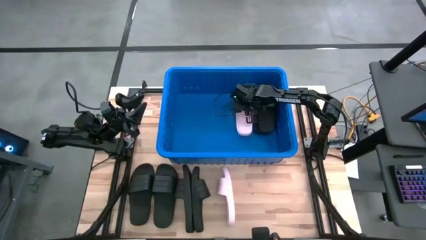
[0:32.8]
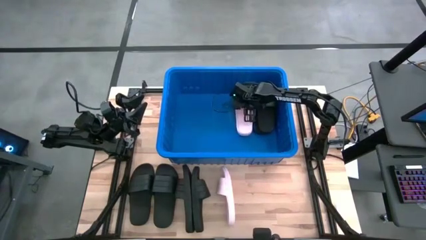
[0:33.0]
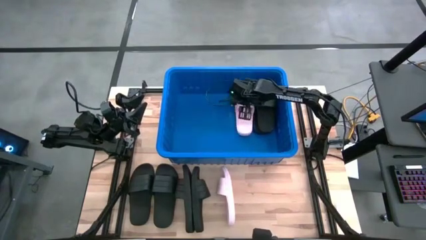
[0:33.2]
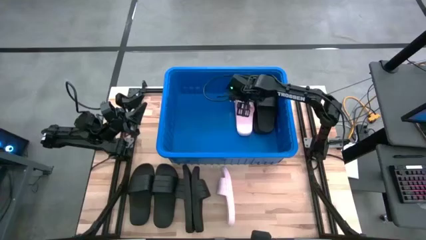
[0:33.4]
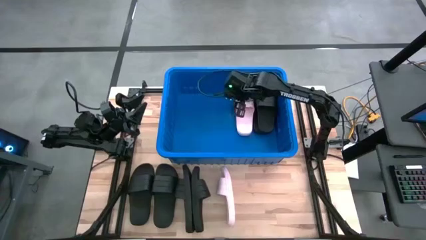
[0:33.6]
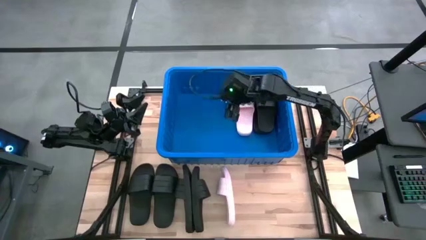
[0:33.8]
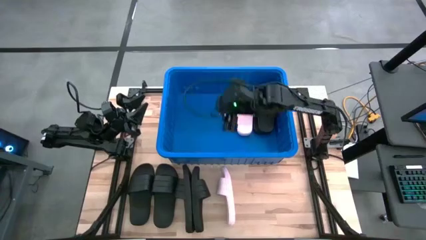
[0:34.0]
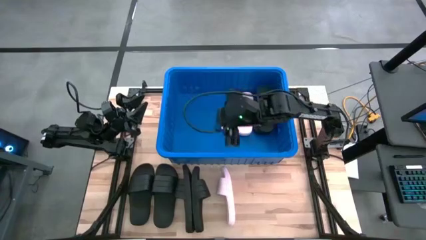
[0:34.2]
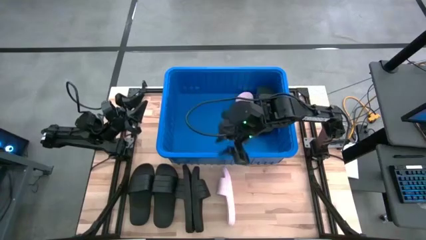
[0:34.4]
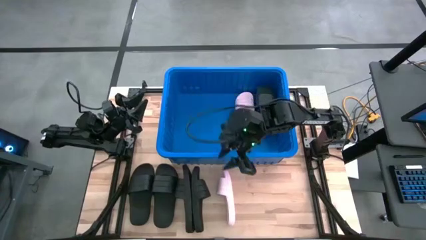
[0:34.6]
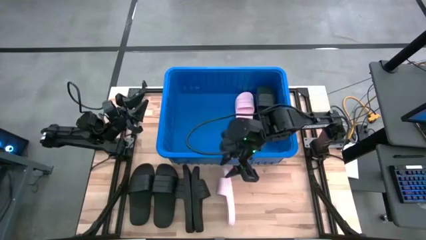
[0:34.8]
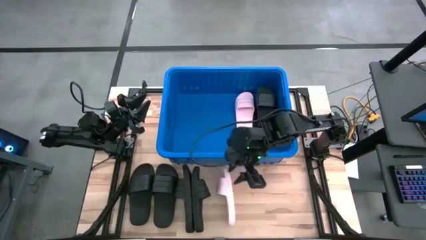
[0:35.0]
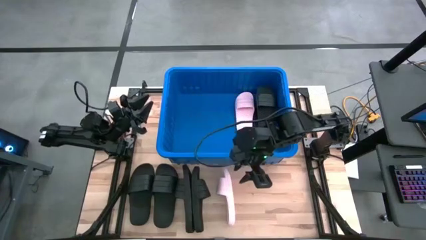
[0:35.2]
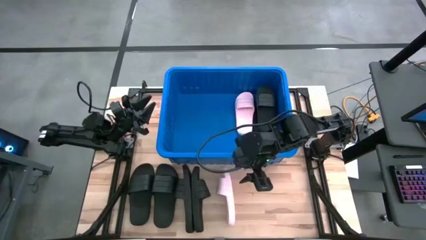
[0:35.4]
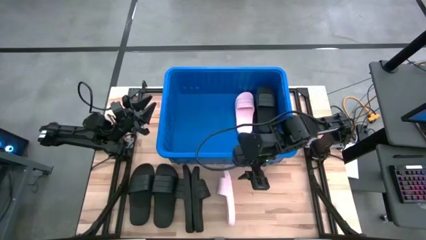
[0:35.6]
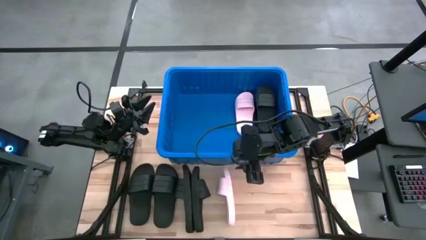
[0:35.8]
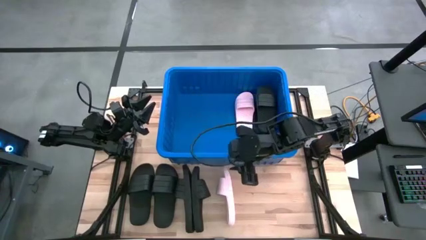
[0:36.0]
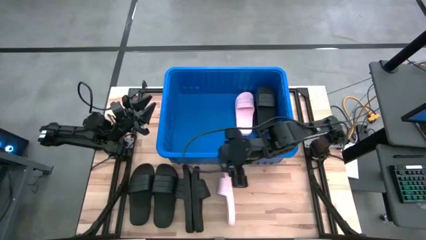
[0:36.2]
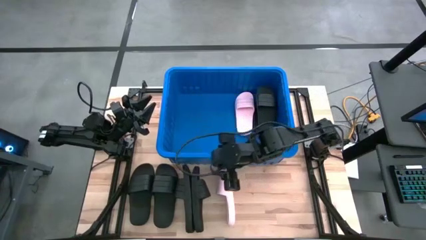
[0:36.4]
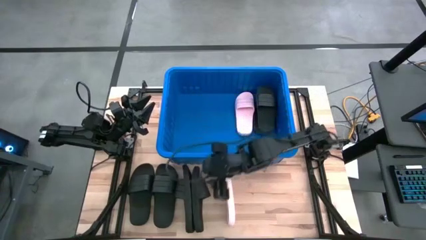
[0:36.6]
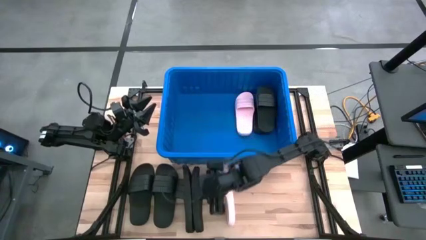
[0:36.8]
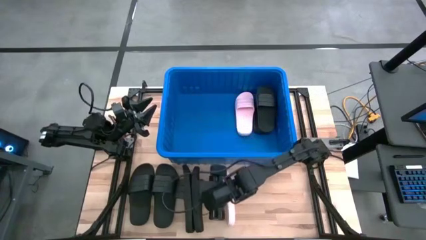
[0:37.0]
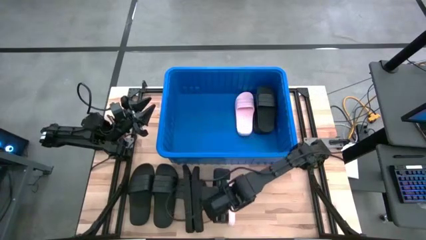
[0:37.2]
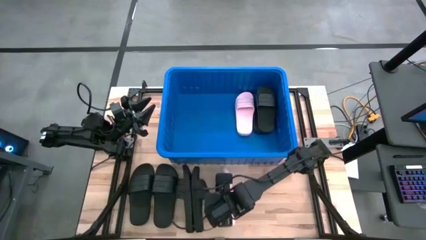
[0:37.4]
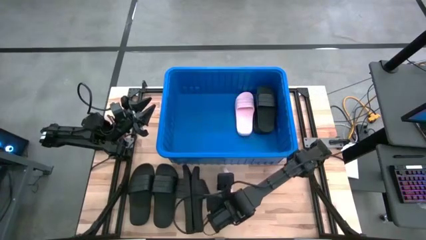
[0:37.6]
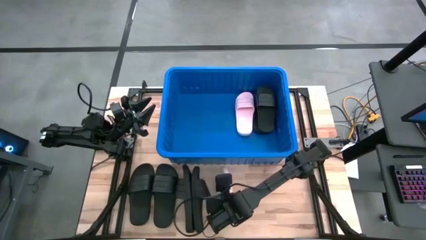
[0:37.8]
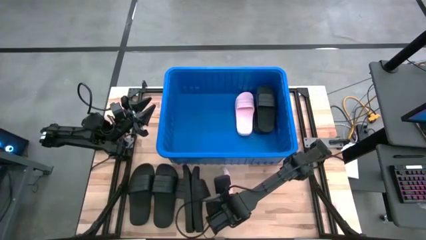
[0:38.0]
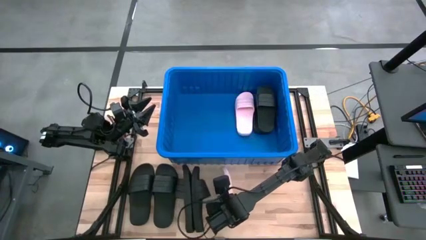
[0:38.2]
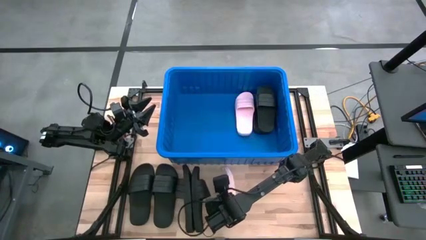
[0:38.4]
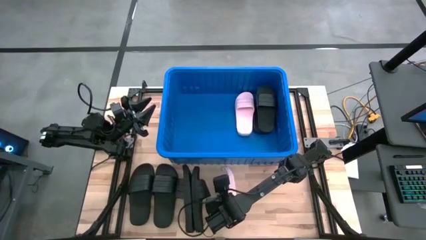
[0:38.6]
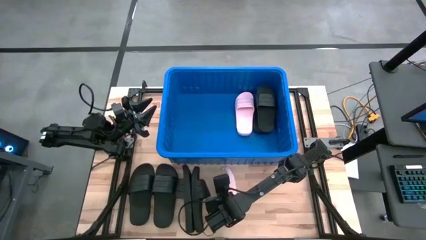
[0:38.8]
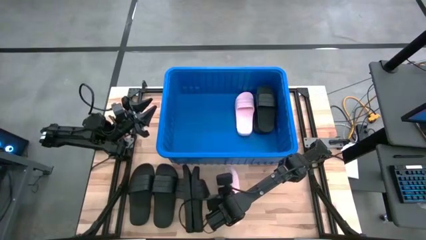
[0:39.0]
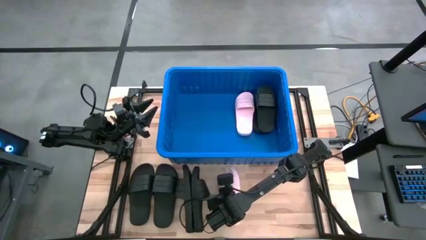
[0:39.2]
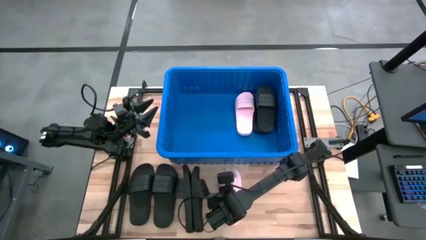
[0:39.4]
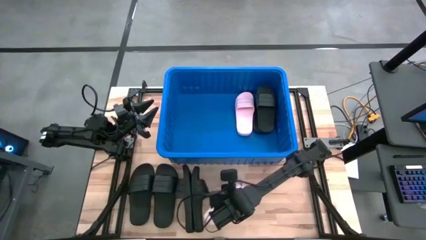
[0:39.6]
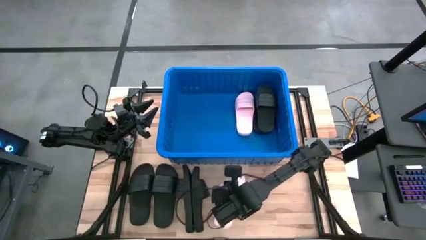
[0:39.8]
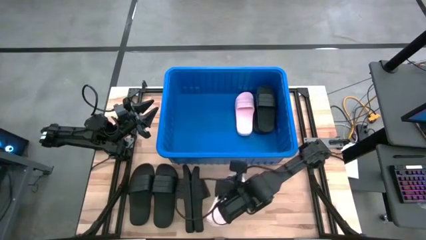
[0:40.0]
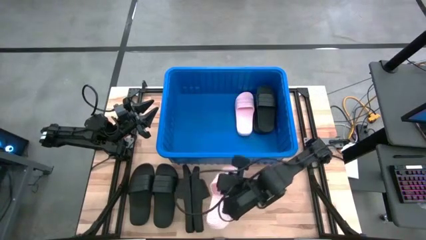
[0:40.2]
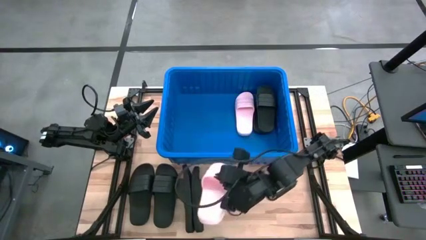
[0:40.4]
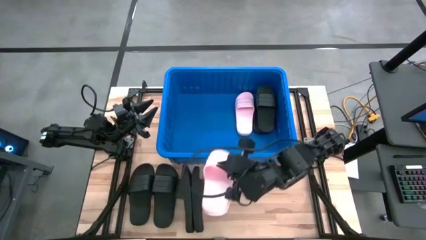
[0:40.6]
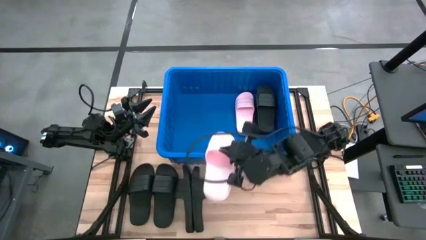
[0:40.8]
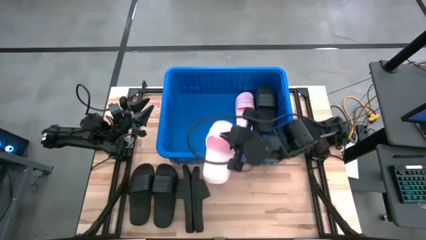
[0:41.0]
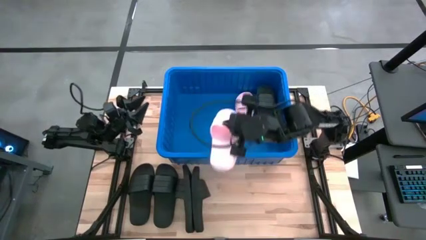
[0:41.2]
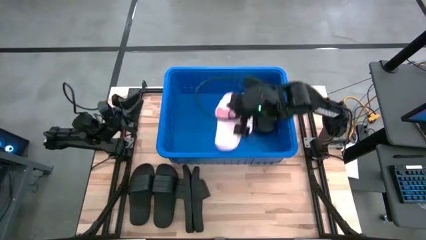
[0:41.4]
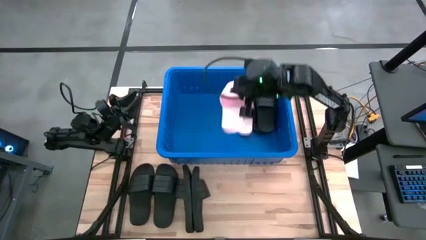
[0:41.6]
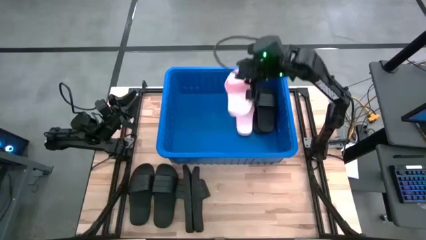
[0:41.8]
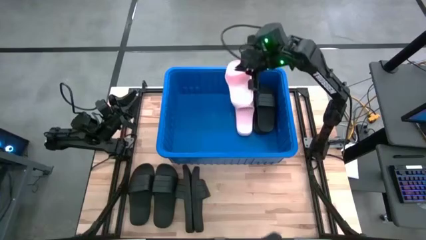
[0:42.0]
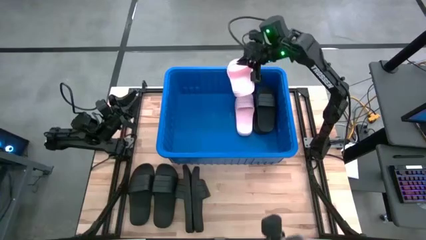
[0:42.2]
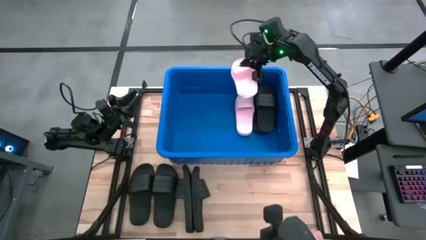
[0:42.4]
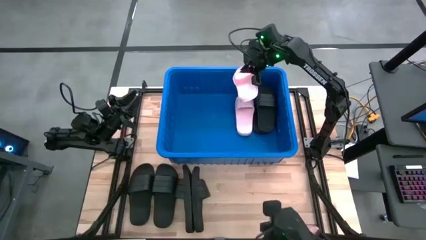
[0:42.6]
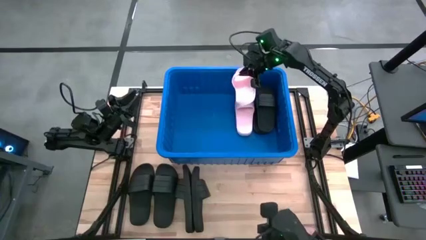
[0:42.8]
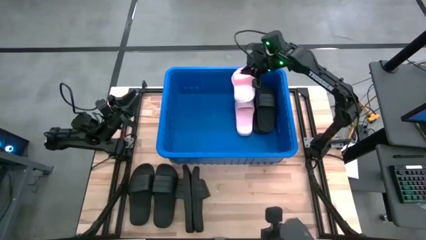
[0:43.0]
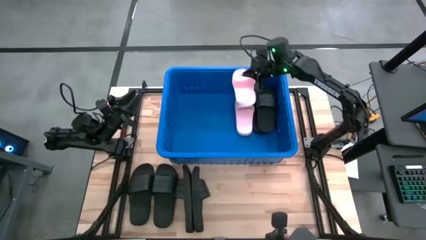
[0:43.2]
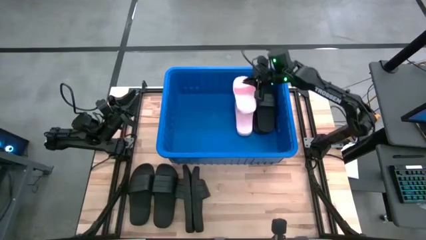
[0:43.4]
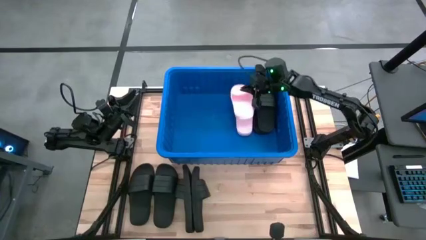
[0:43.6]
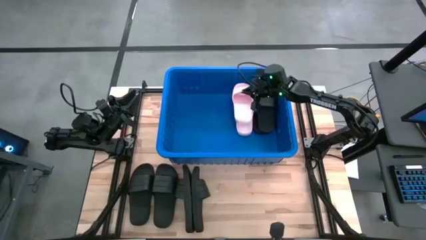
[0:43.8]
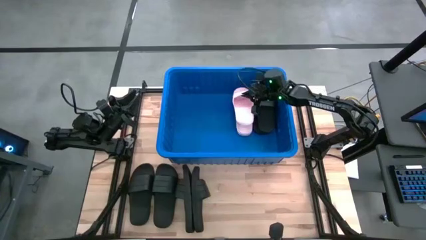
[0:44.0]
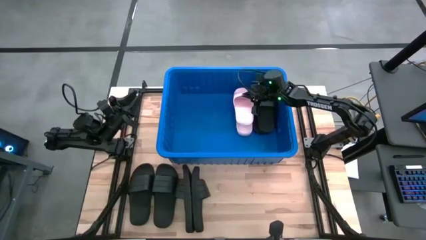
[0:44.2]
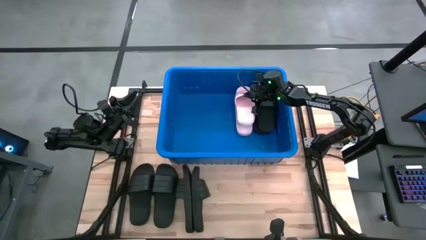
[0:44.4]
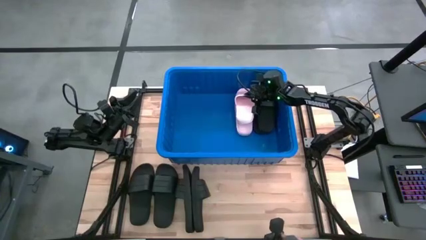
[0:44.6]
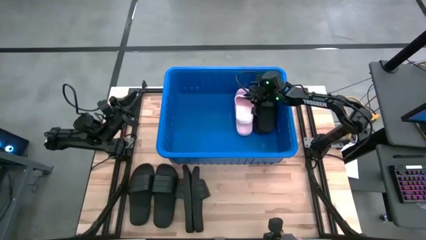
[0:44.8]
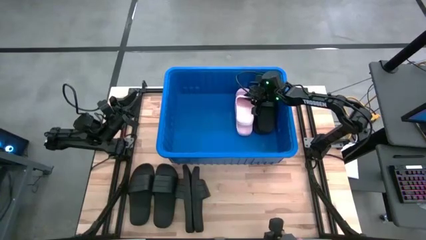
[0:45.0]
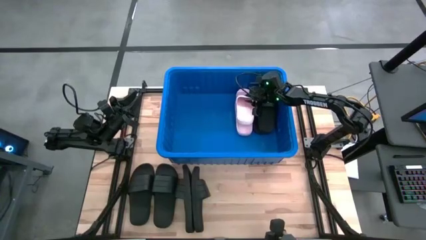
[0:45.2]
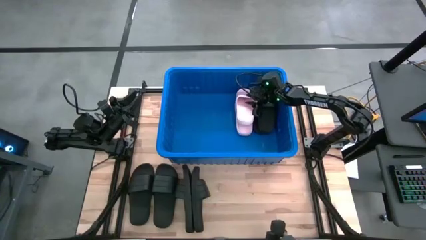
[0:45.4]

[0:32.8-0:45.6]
Task: Pick and place slides into bin
Put the pink slide into the blue bin

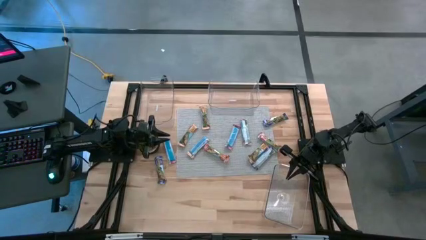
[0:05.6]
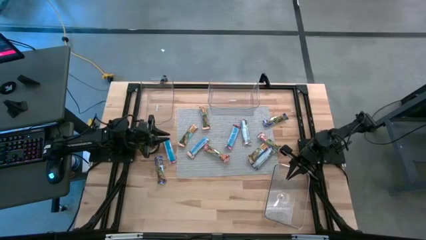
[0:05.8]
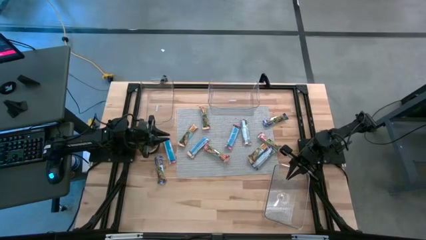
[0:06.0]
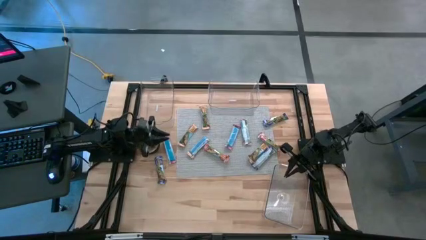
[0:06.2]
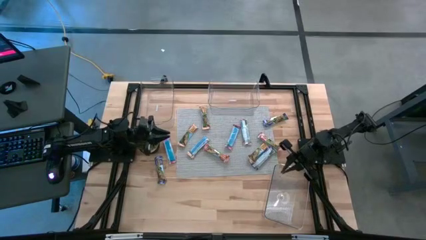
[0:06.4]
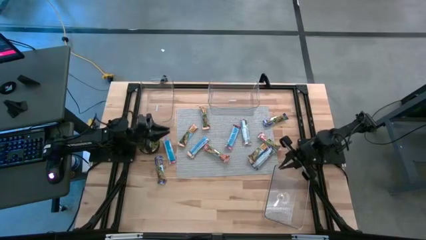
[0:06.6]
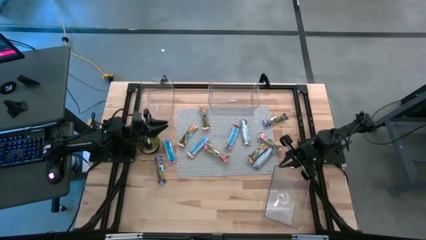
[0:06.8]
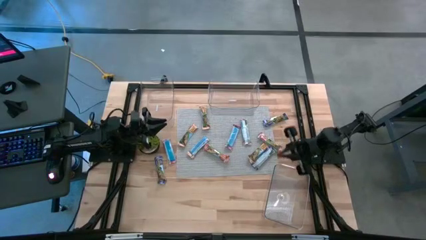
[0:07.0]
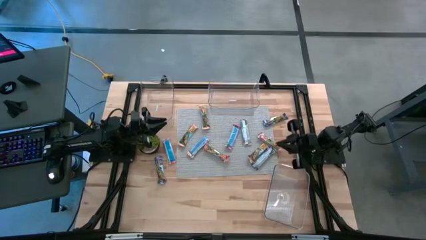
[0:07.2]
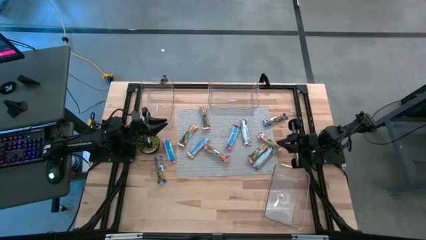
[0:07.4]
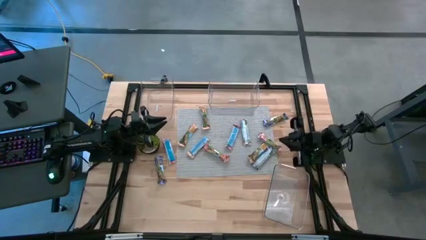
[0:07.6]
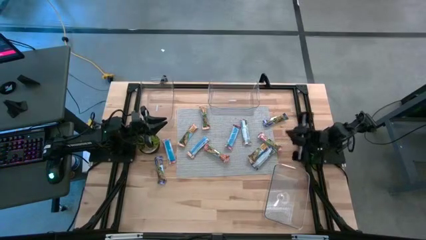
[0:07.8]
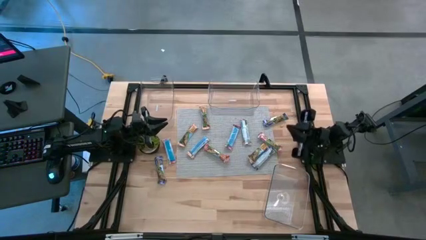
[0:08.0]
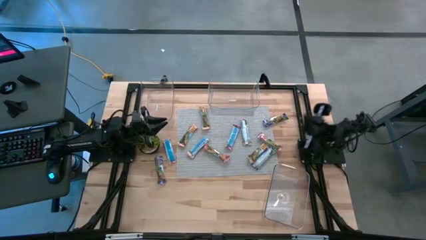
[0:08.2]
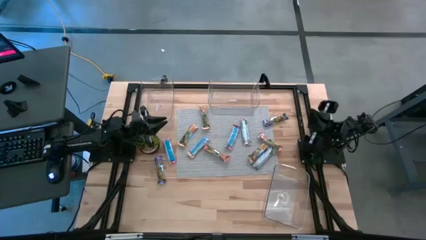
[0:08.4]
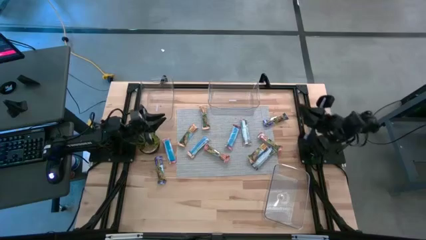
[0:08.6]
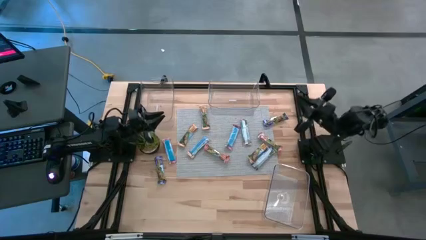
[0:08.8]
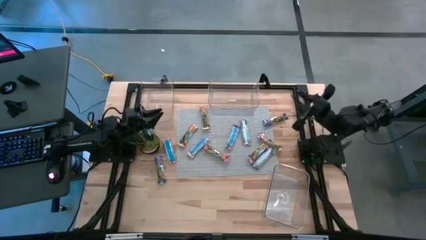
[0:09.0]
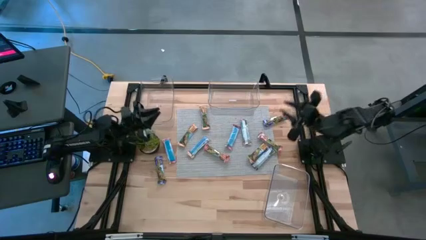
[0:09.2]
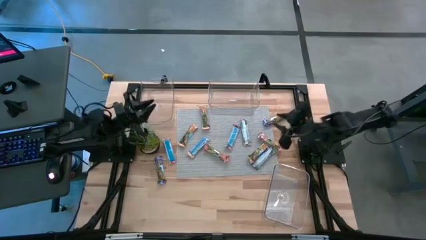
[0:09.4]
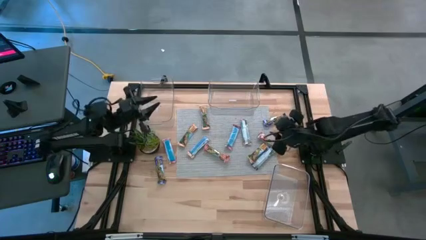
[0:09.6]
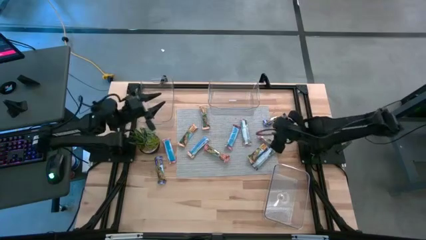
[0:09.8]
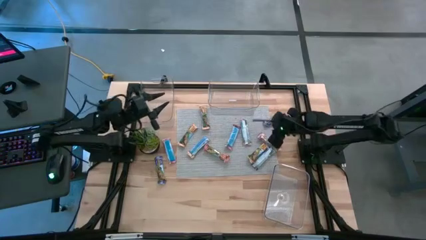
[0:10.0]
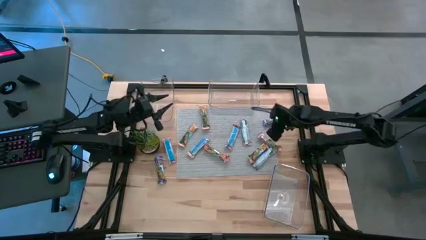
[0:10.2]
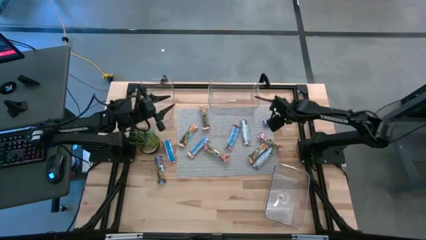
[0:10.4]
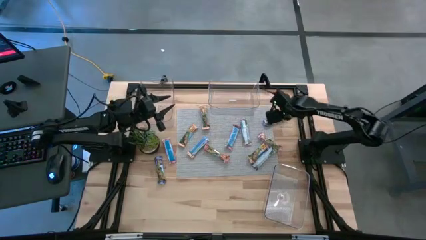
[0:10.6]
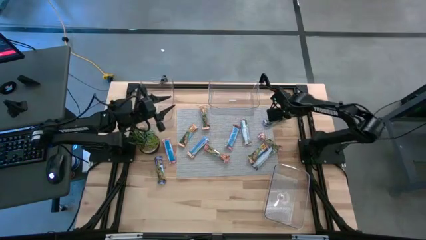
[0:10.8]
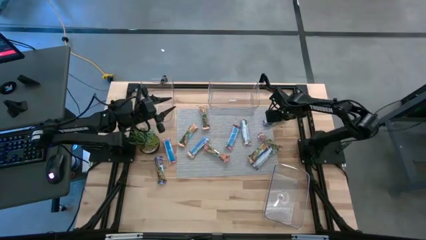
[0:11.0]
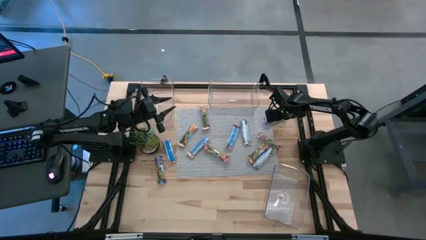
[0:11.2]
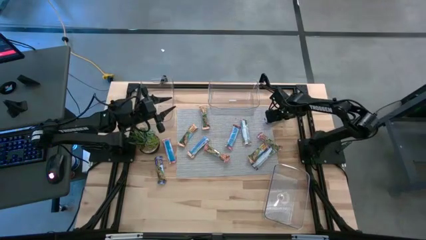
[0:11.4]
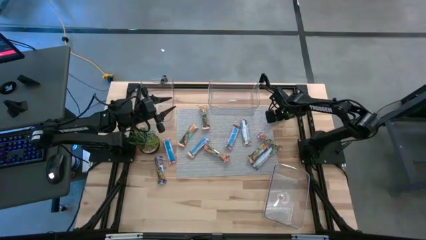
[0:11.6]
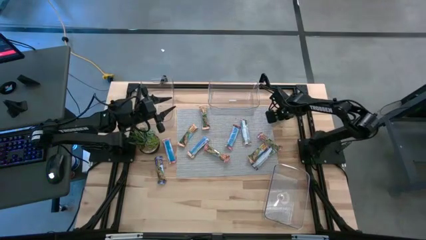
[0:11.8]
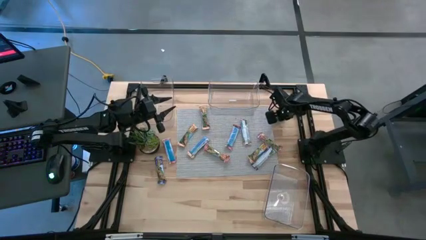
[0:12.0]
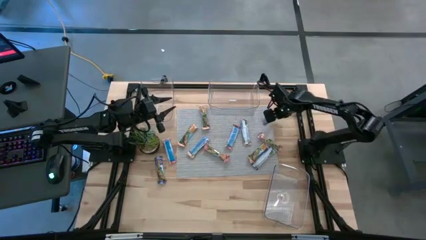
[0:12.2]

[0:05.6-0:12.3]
Task: Pick and place Granola Bars by type
Put the blue granola bar into the right transparent bin
